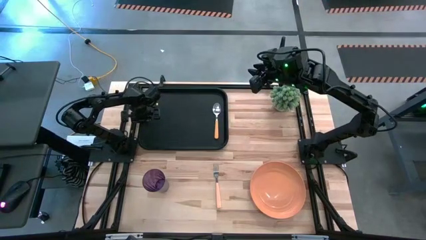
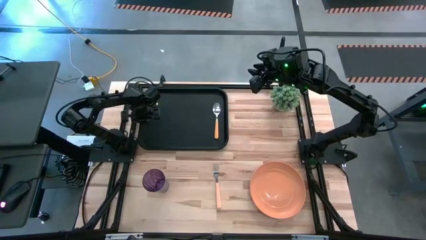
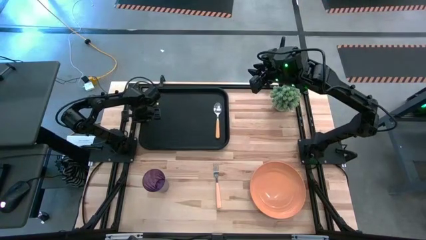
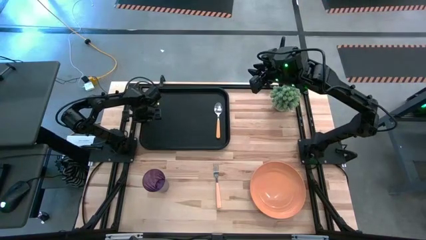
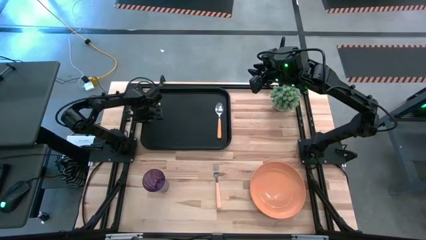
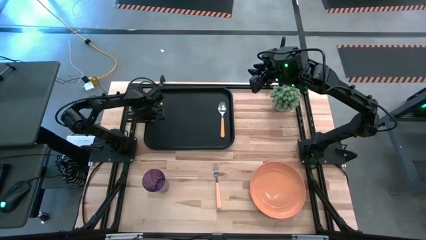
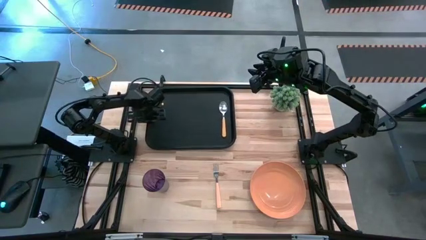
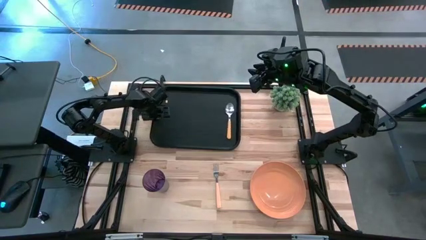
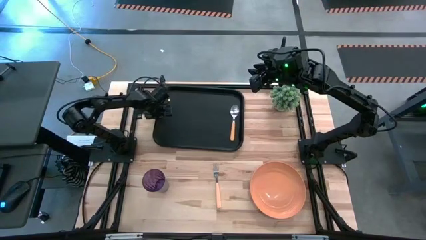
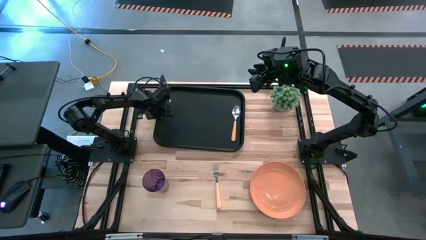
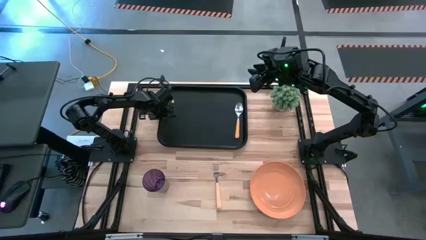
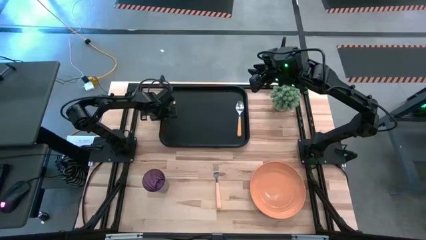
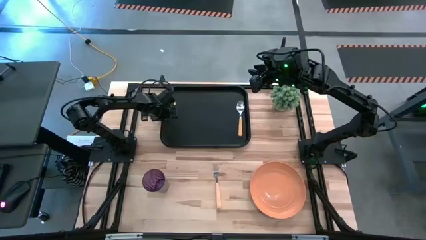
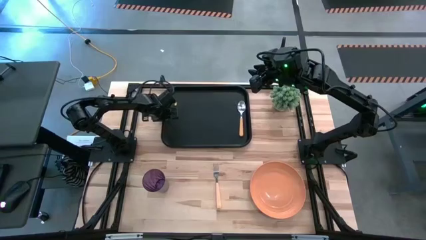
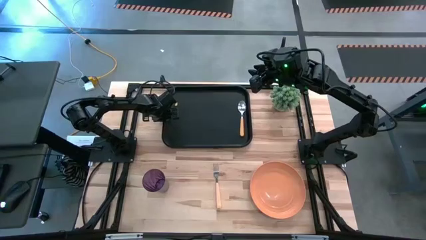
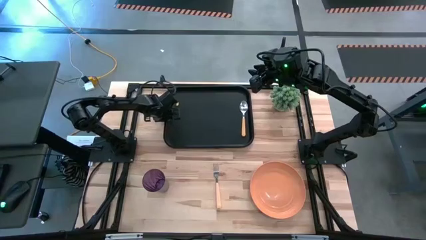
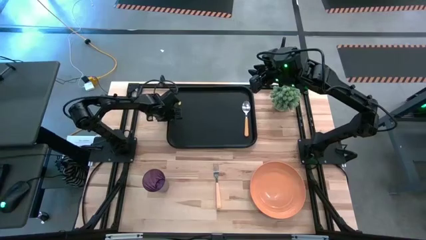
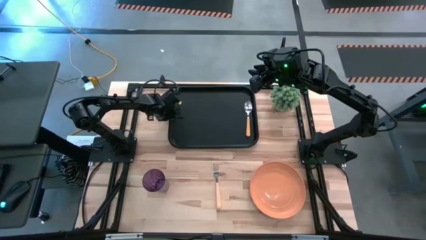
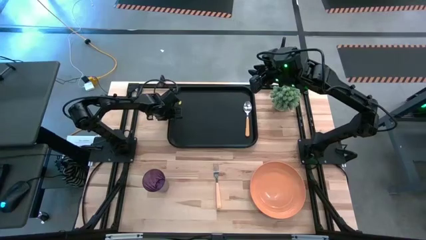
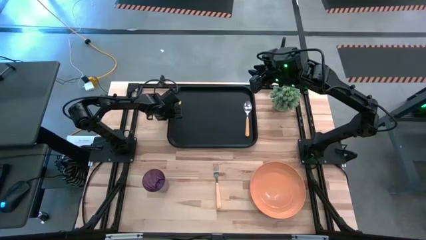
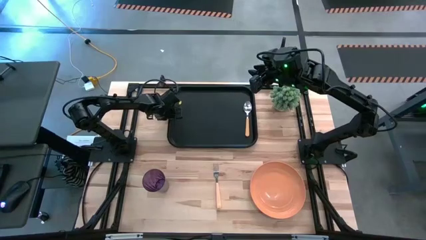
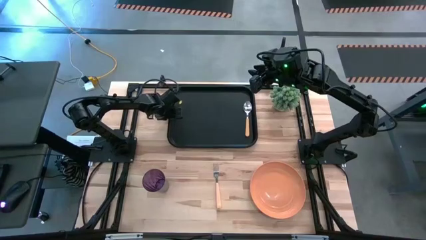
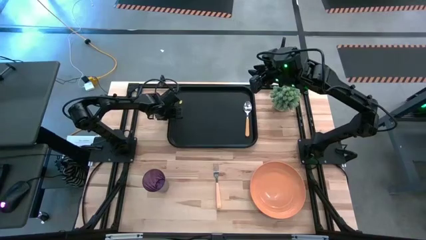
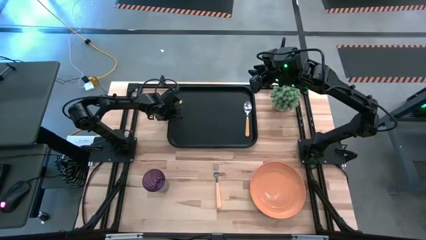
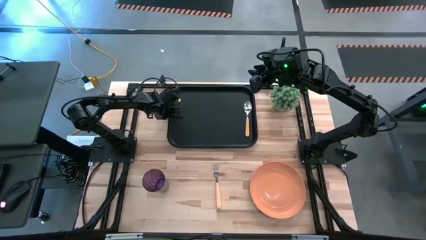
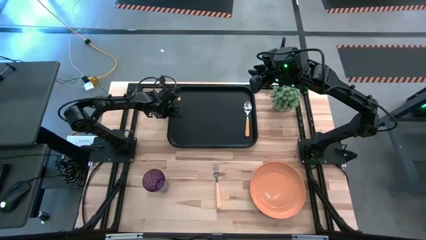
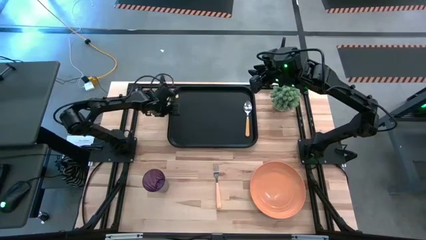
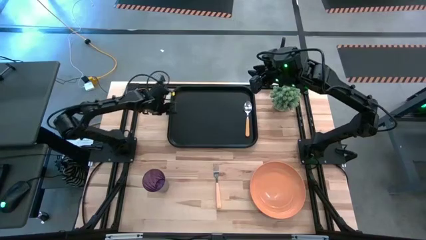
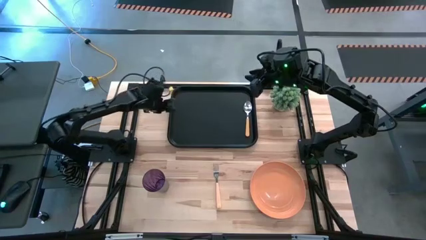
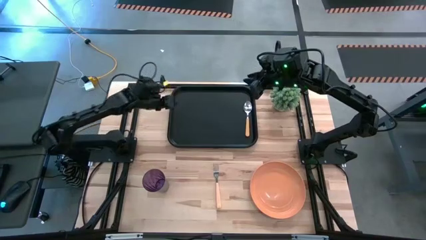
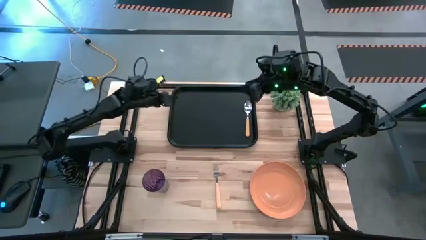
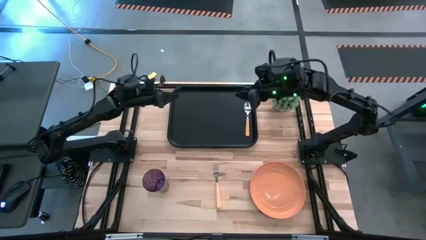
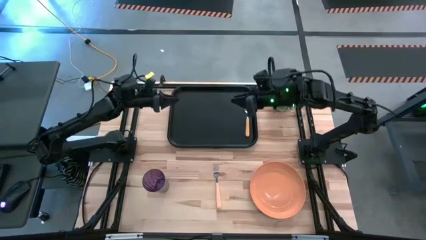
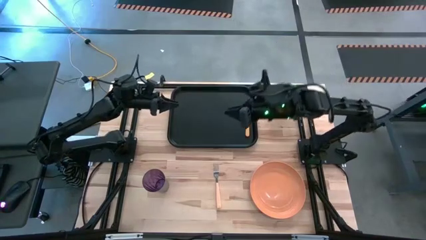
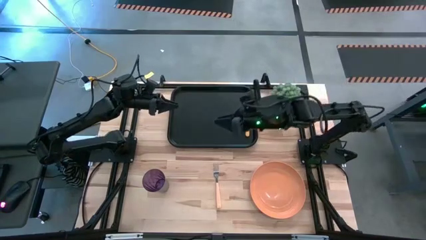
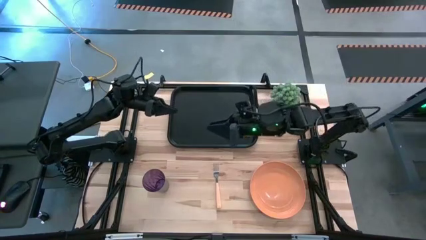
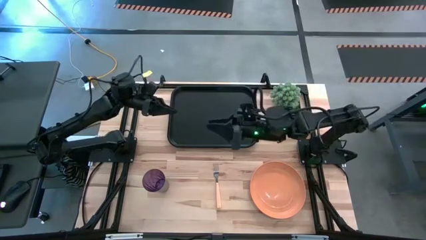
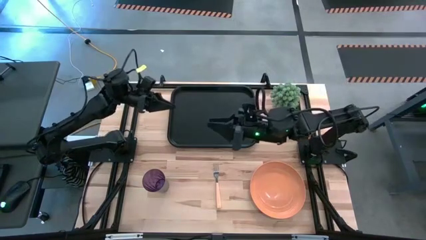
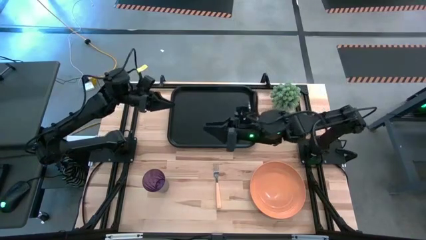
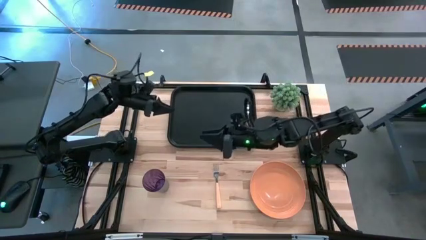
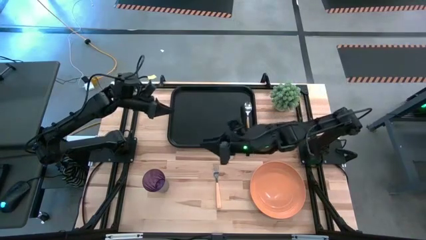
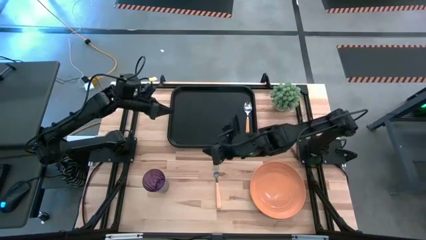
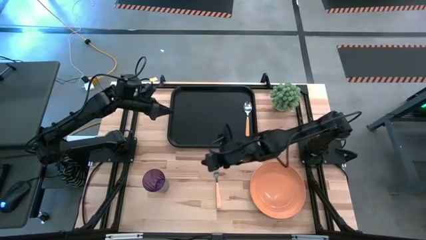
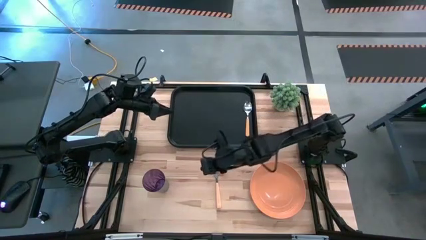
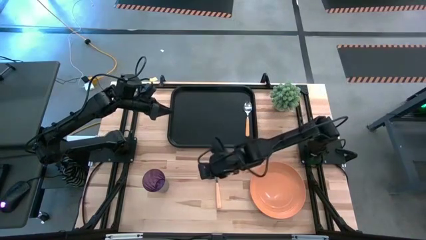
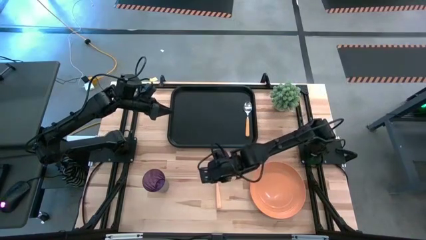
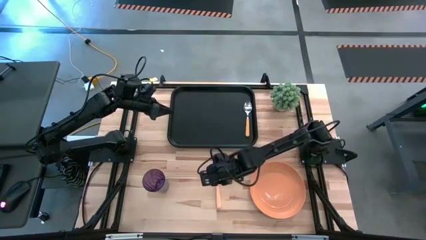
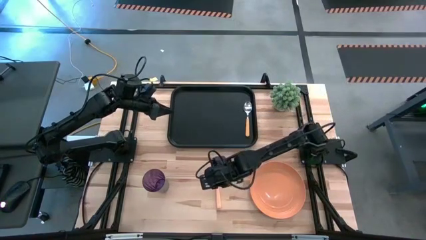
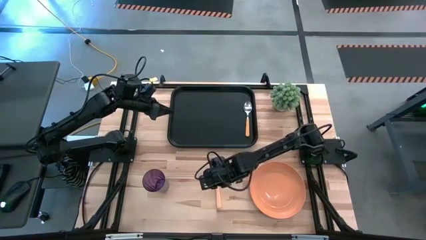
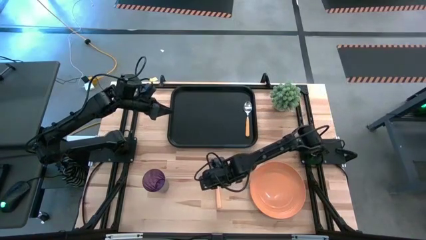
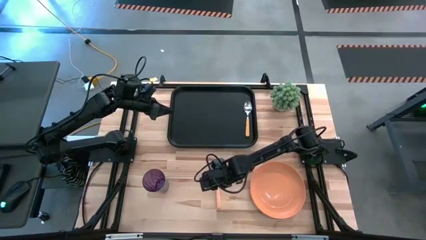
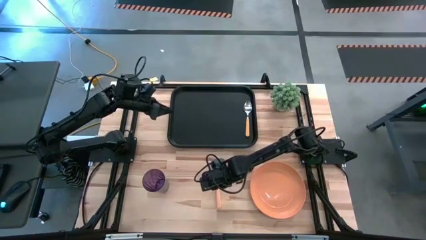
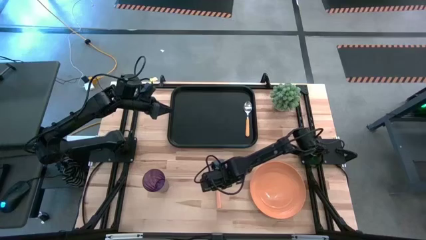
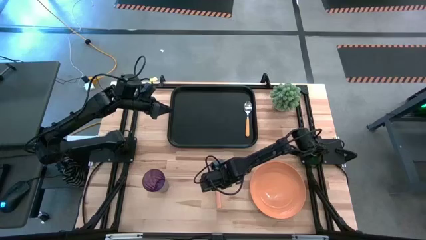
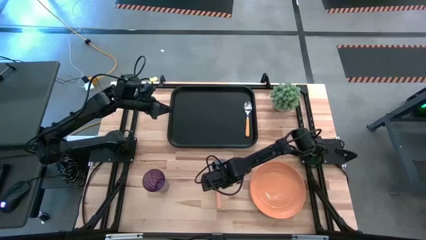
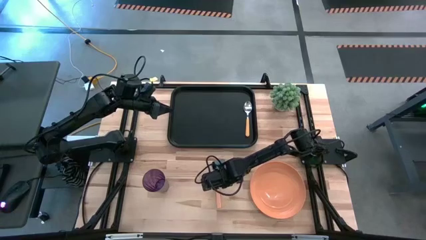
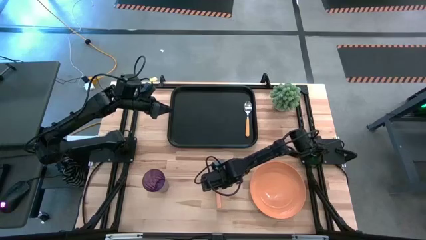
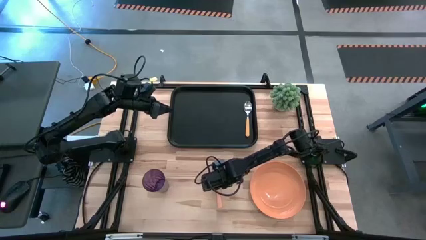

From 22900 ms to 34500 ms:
Task: Pick and place plate/cup/fork/spoon on tray
Move the black tray from top left to the top center of the table

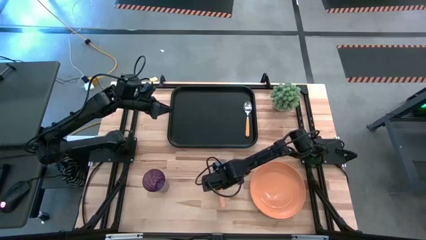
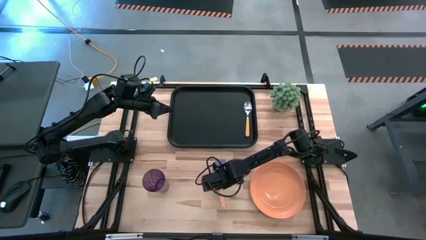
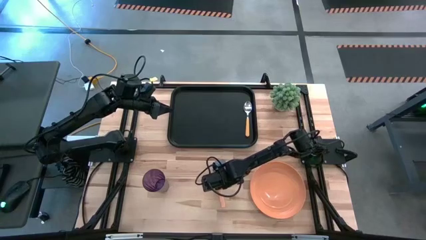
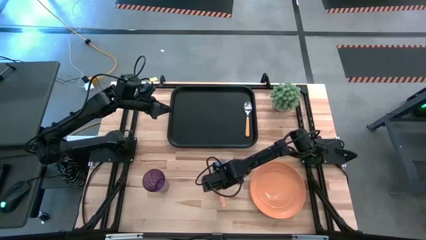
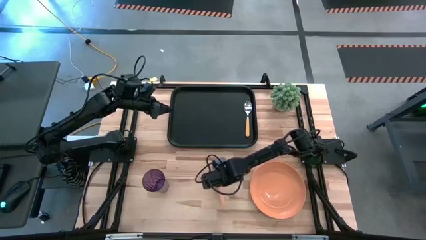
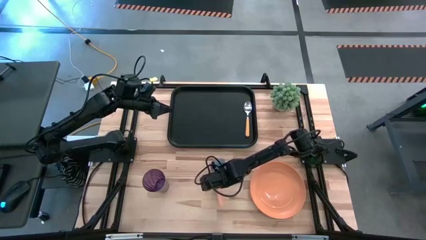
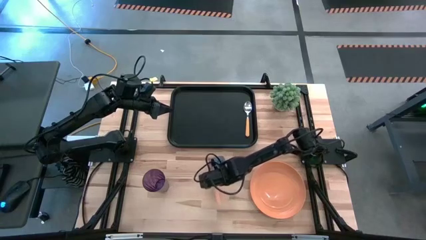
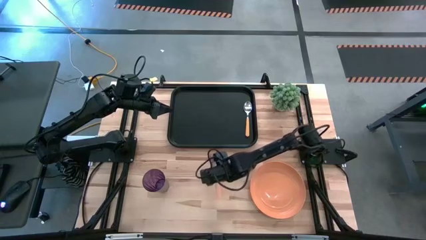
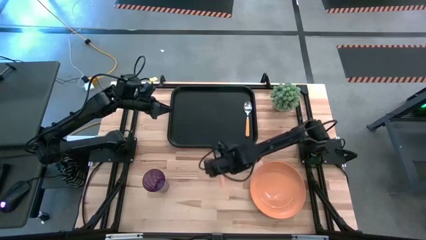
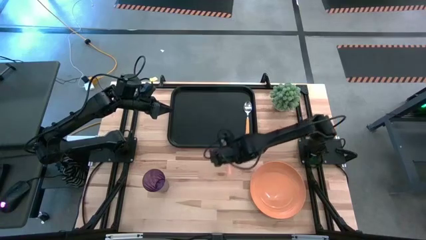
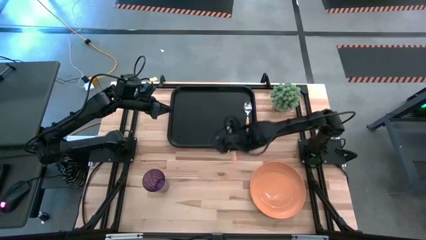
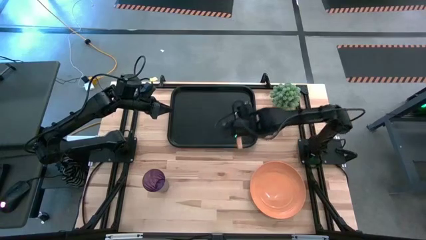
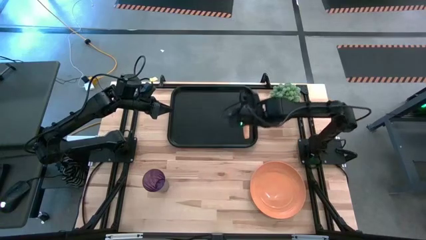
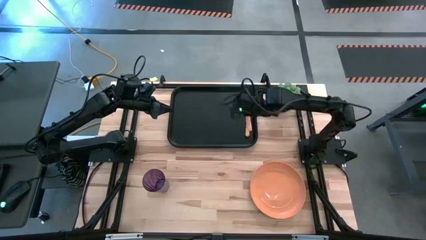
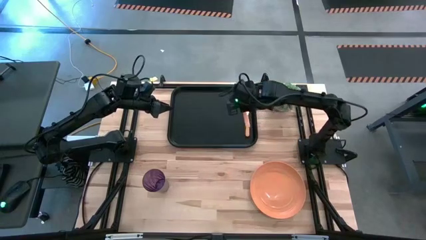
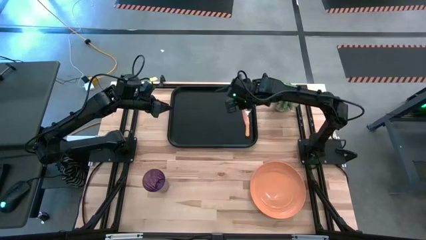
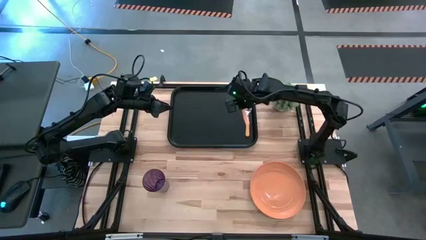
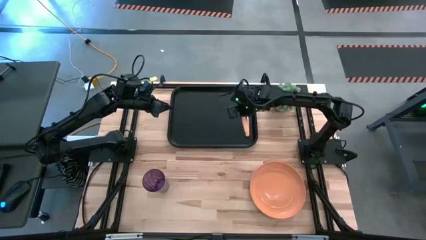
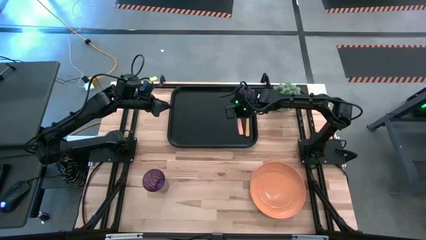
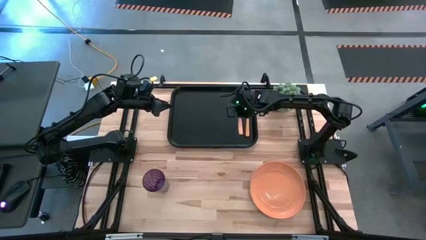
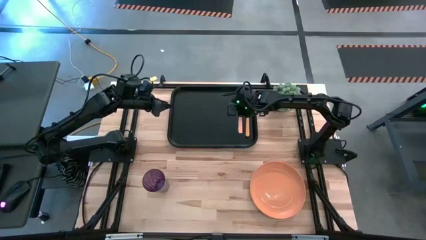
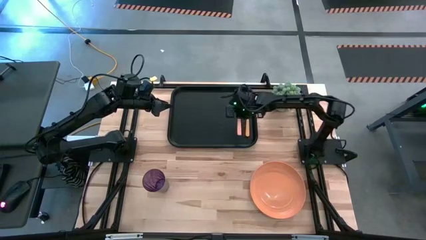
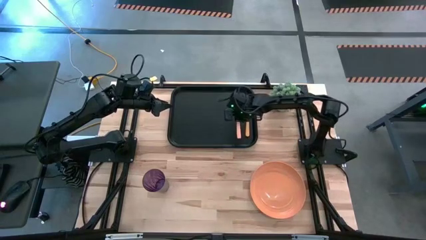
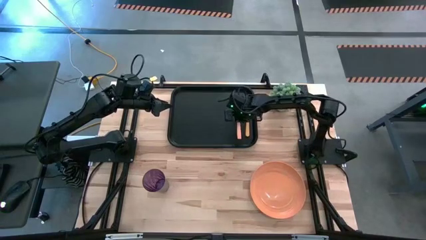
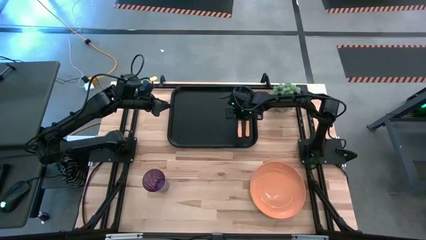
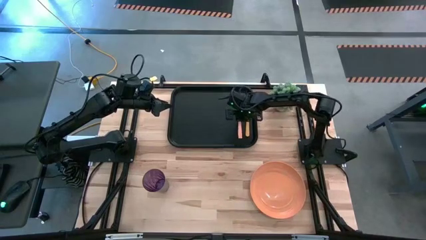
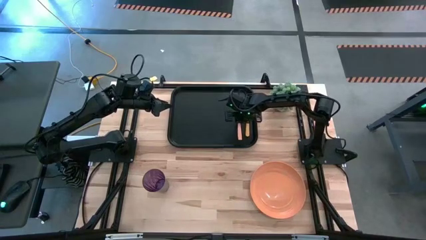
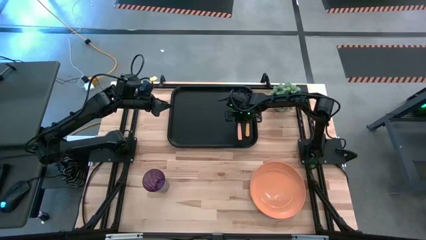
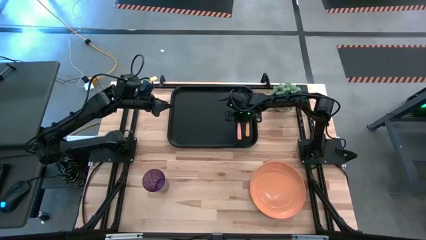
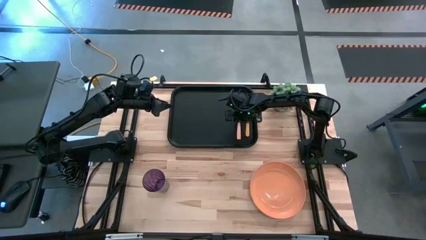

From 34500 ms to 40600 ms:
Put the orange fork on the black tray to the left of the orange spoon
